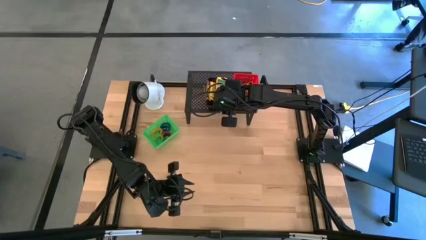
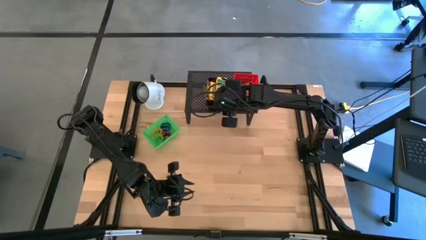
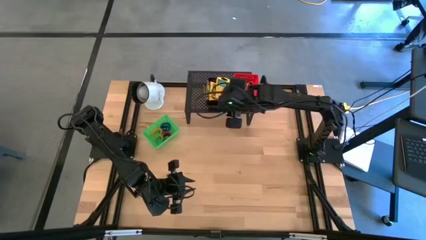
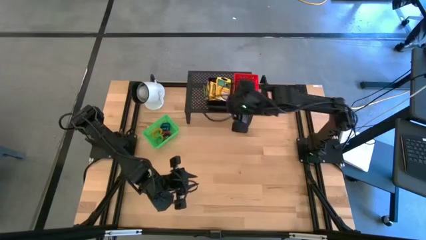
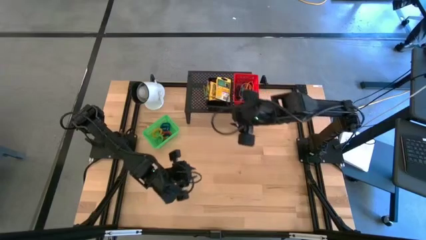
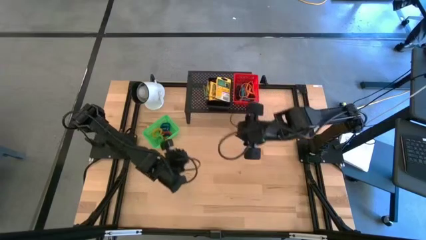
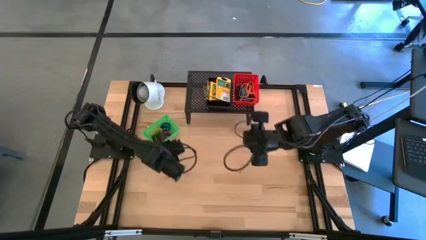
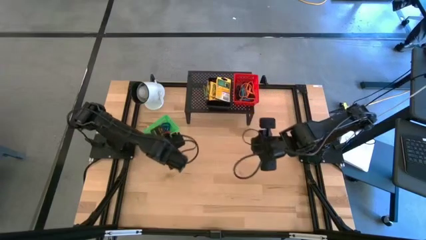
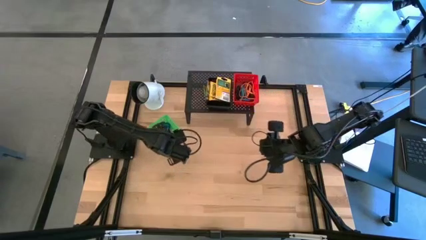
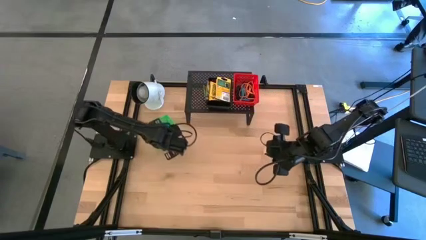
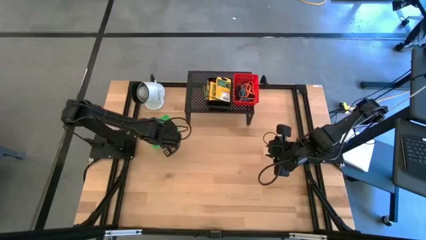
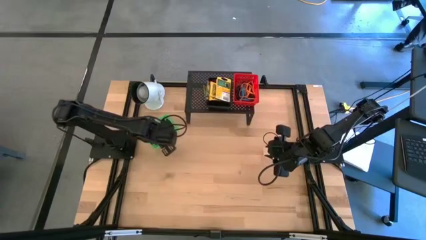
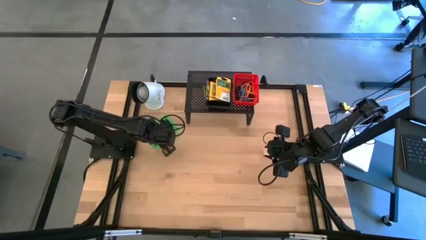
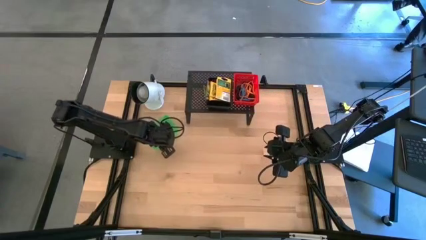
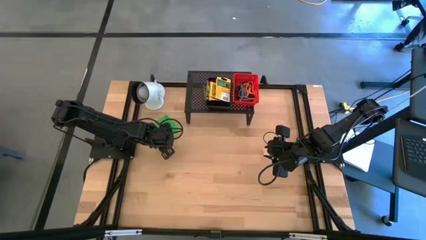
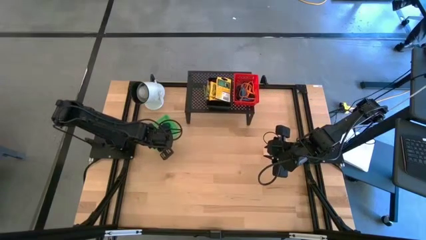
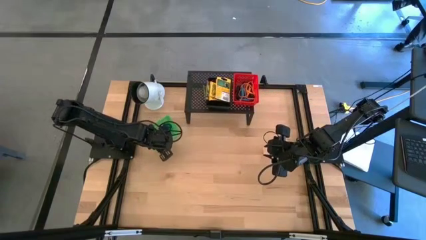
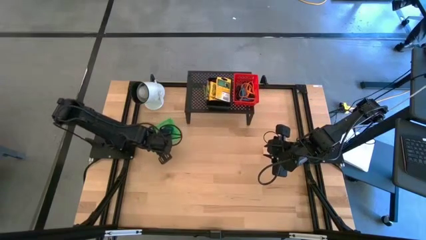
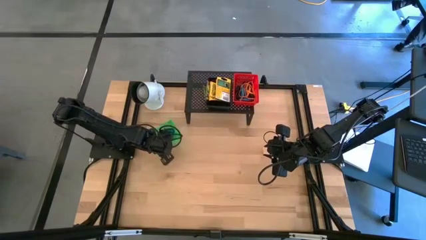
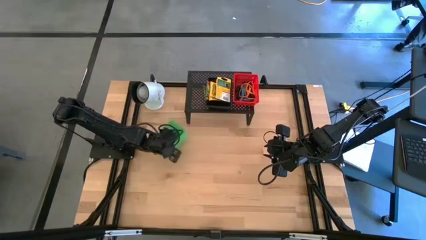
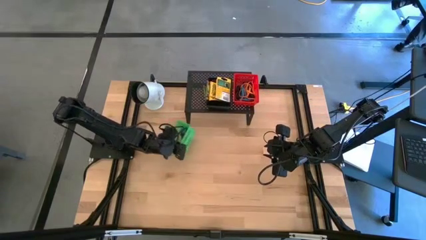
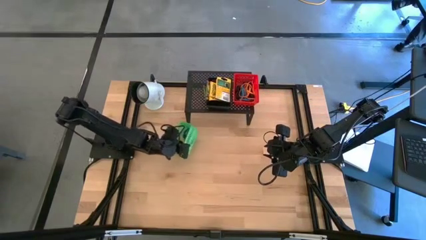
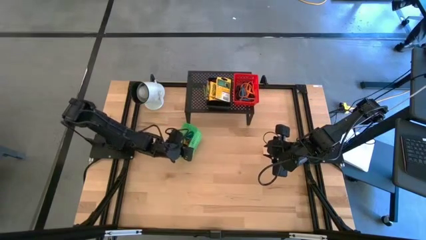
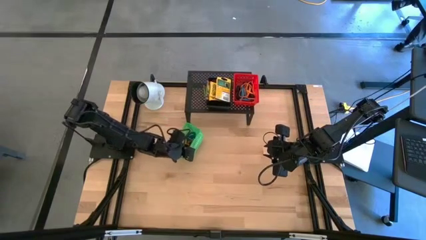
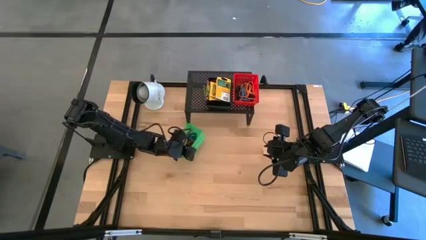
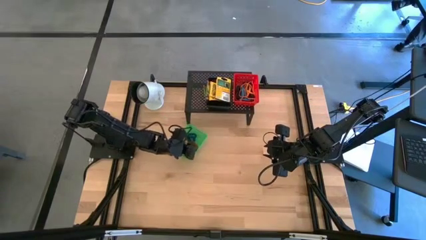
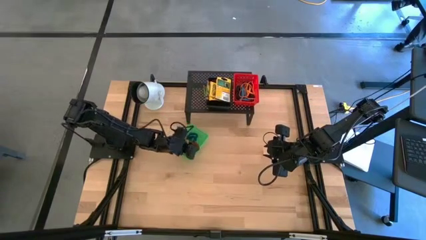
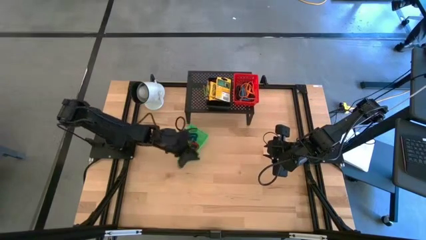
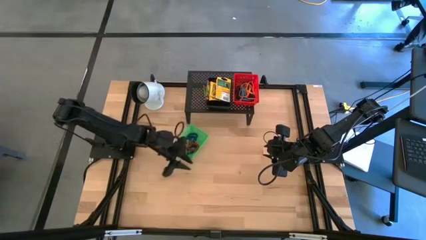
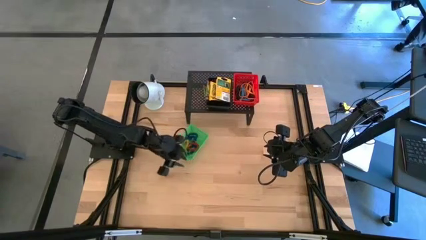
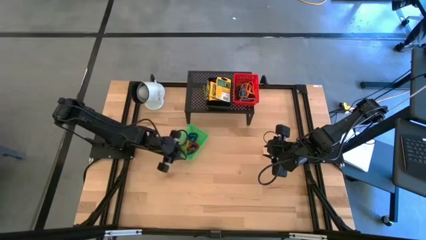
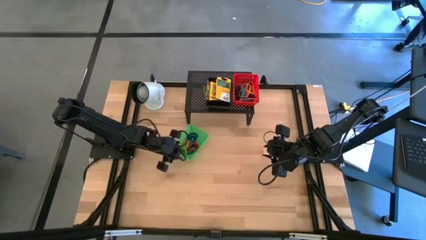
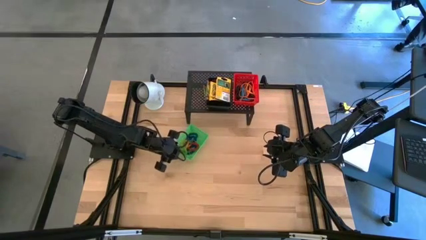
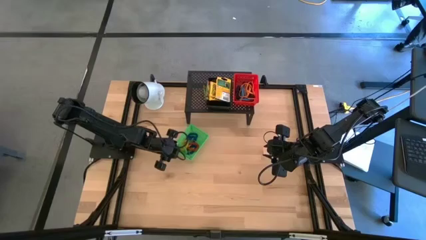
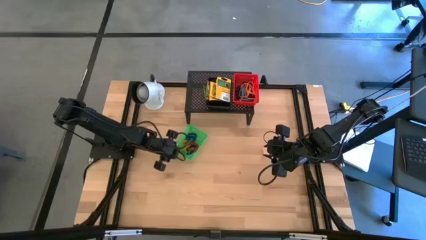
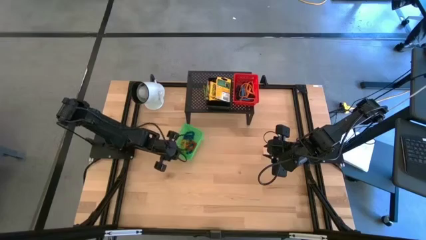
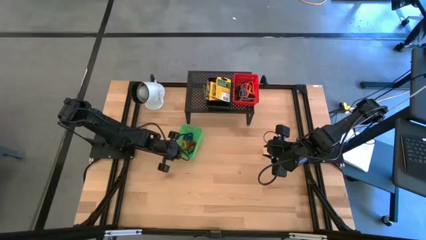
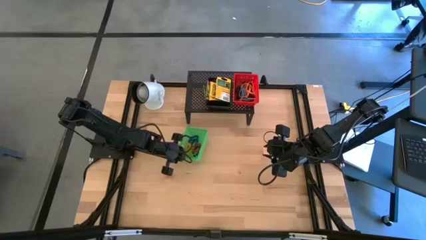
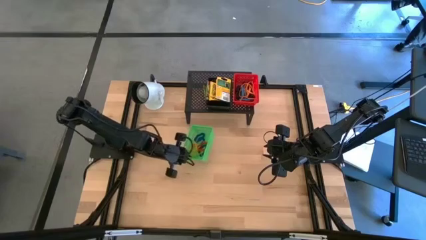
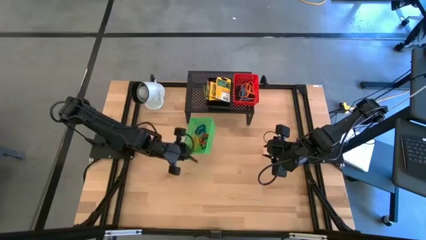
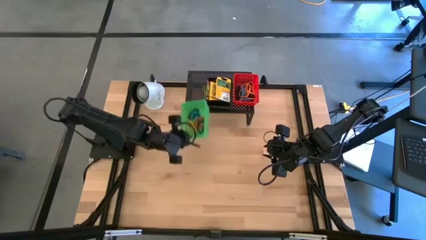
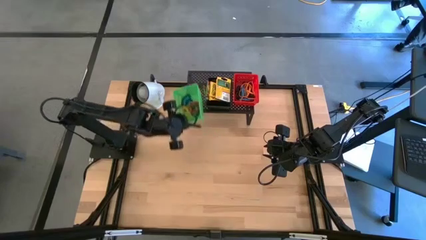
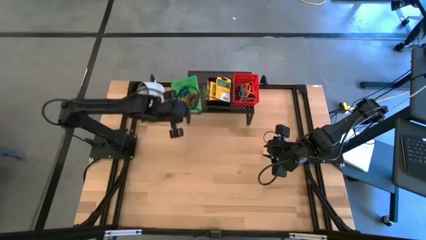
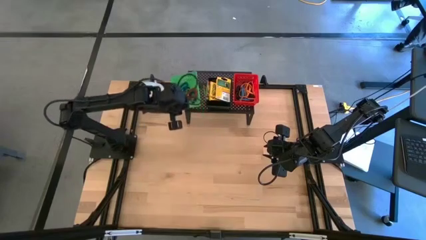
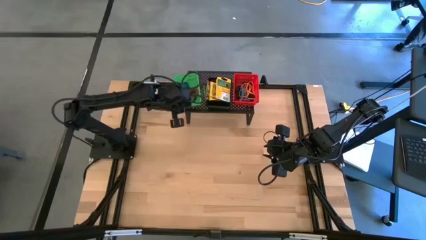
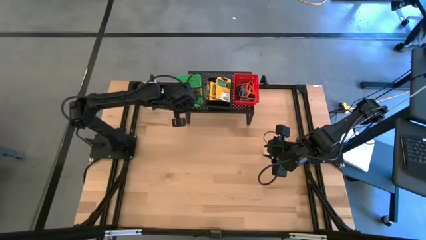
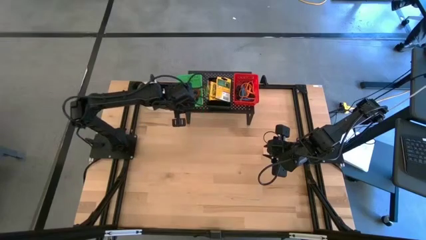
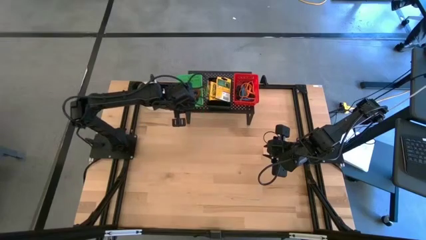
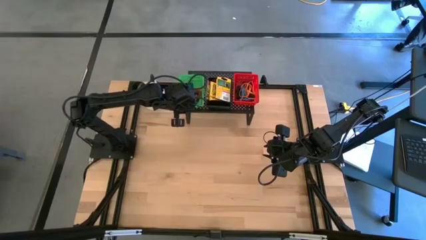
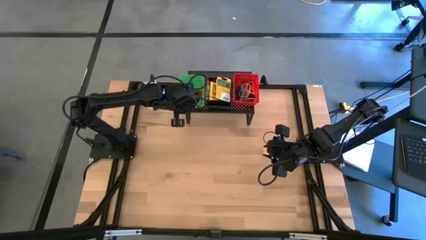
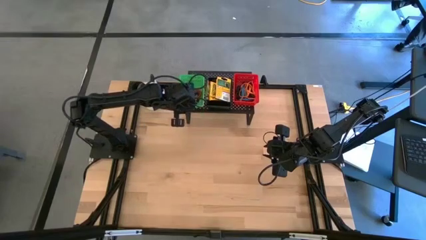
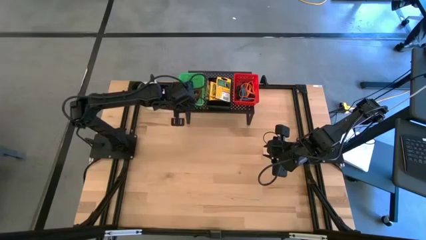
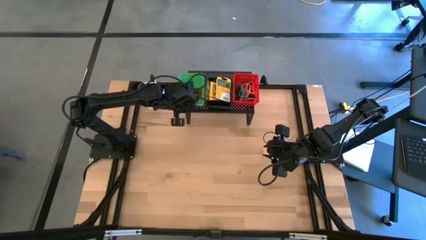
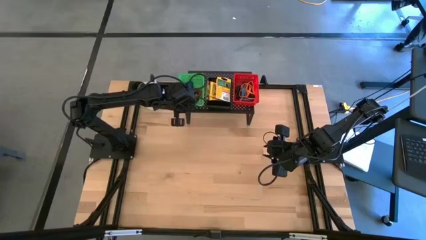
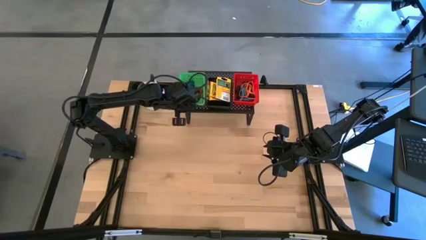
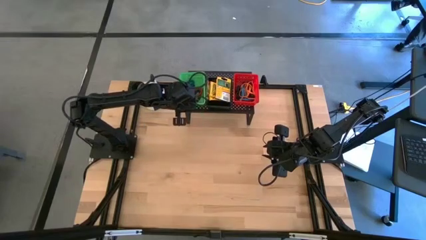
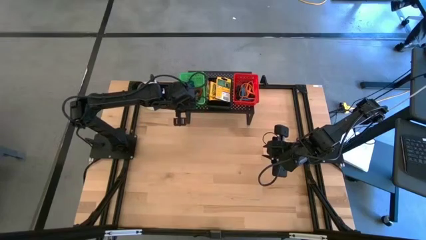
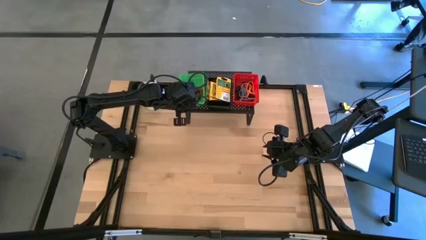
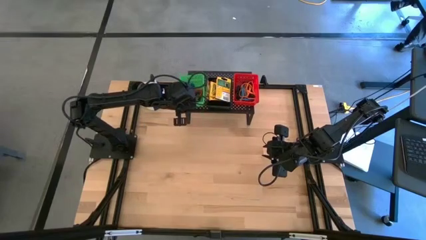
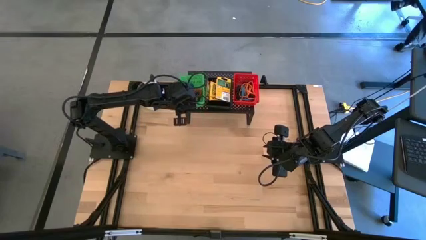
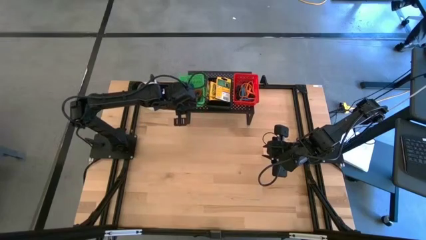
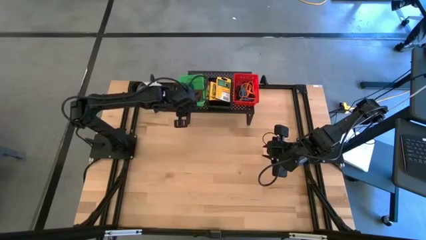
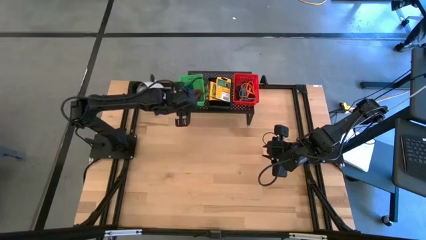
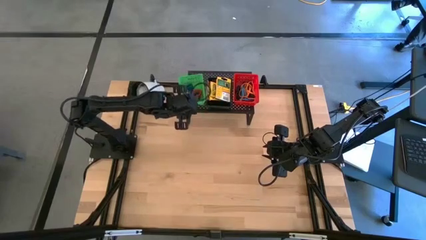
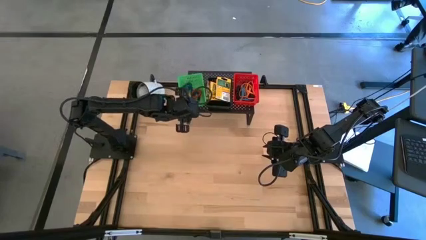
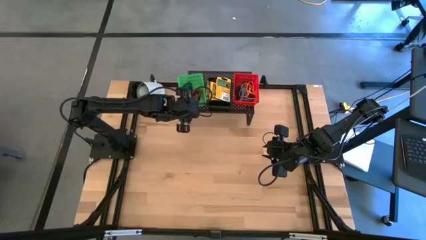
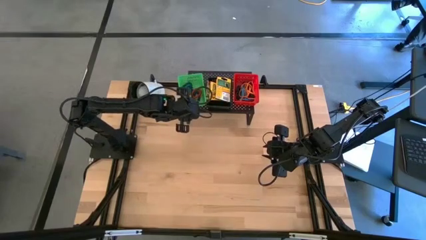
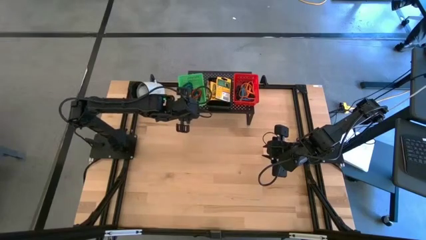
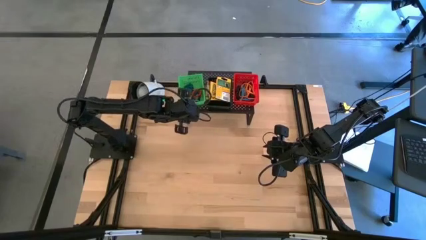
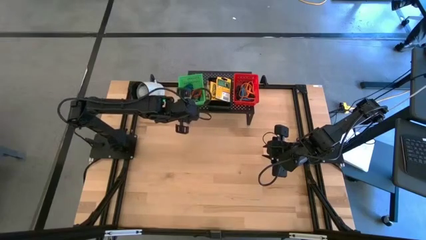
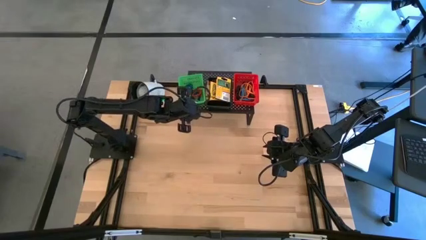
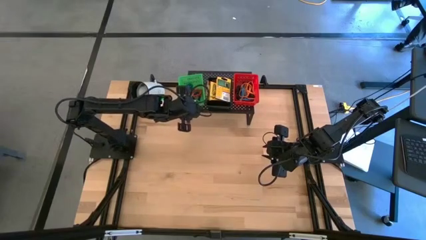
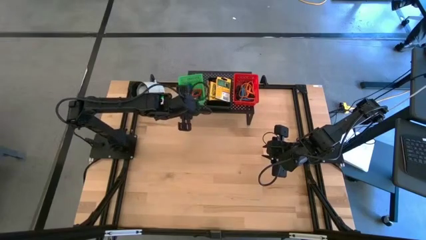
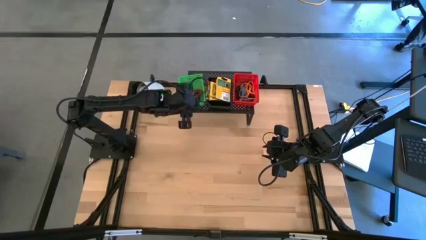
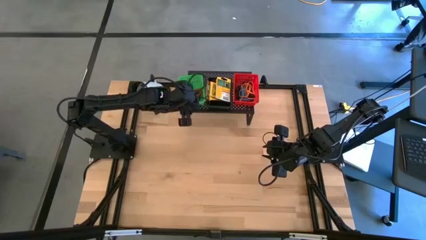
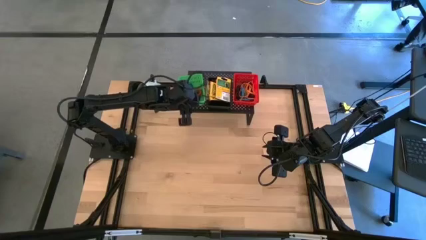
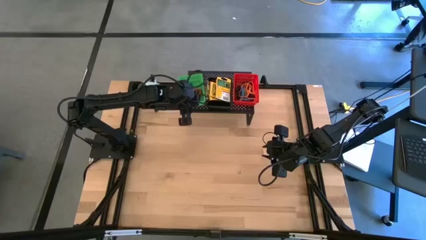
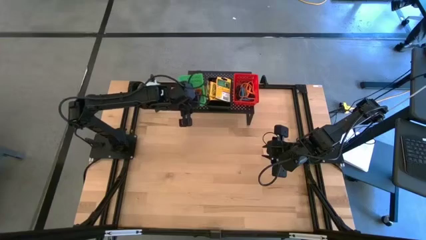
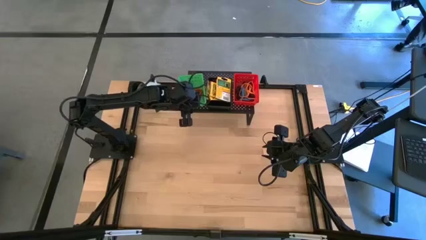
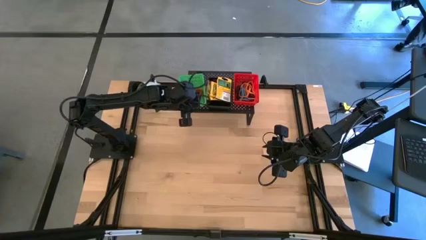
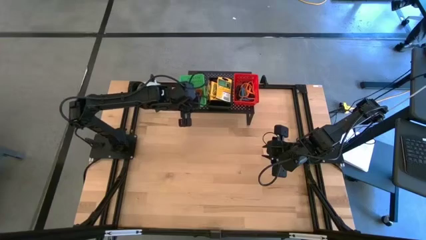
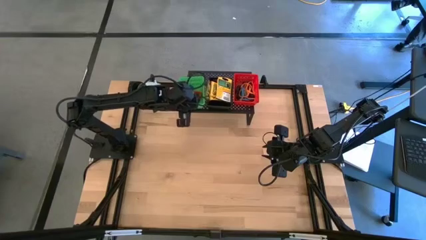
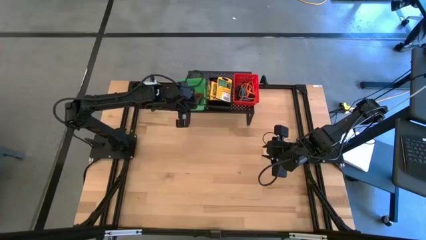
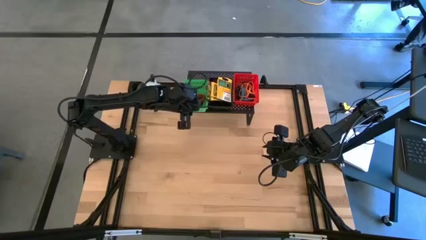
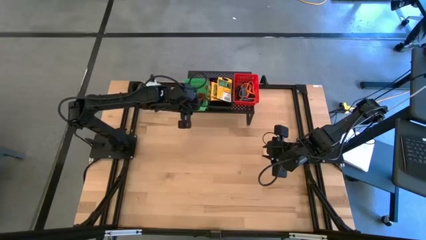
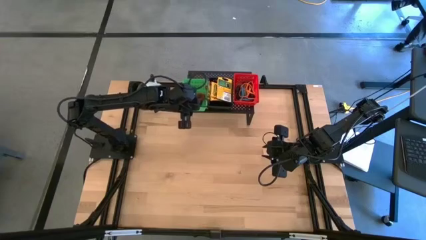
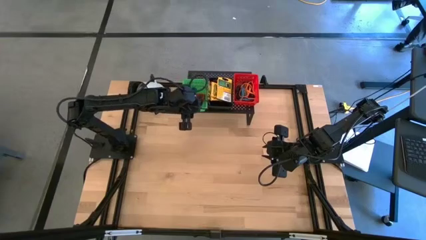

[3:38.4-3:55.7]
Task: Pick & Place Office Desk Supplies
Put the green bin on the shelf
